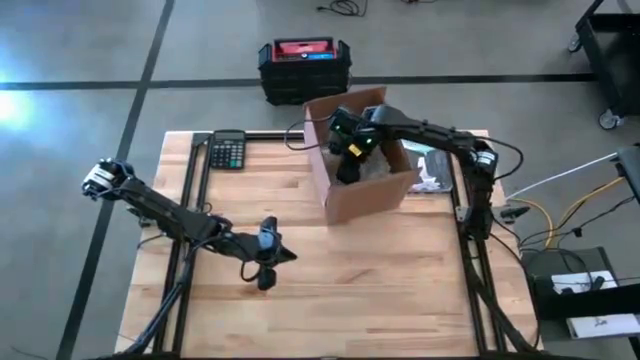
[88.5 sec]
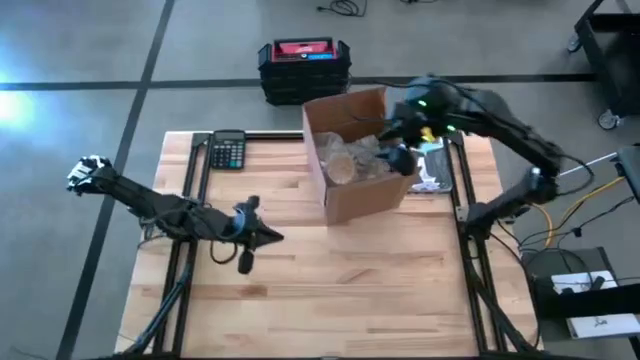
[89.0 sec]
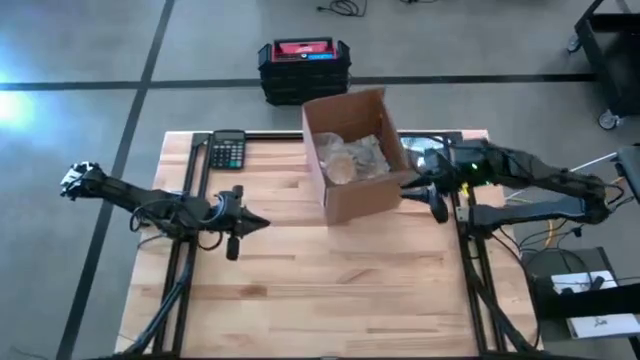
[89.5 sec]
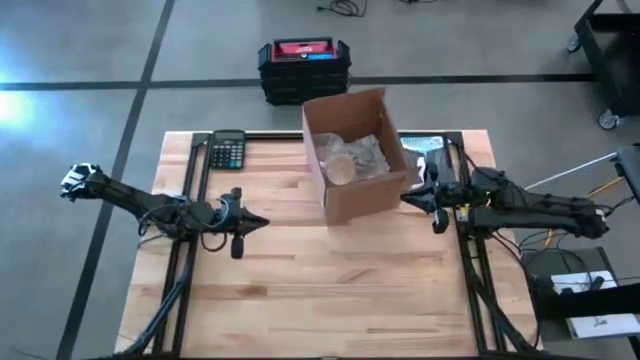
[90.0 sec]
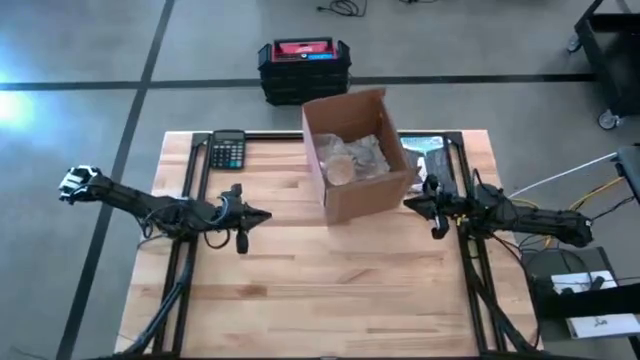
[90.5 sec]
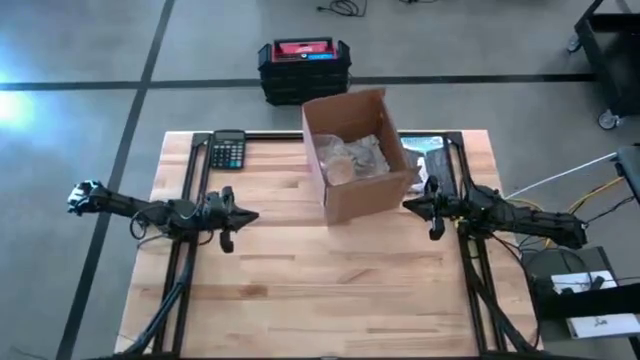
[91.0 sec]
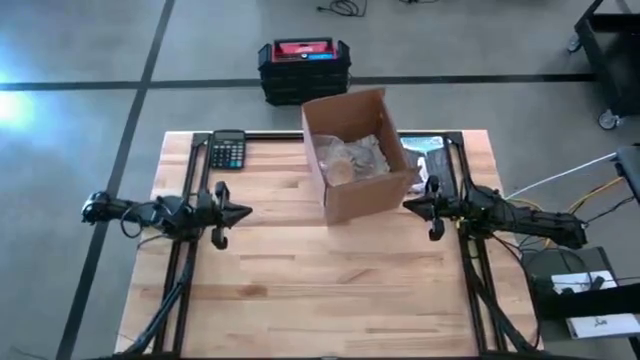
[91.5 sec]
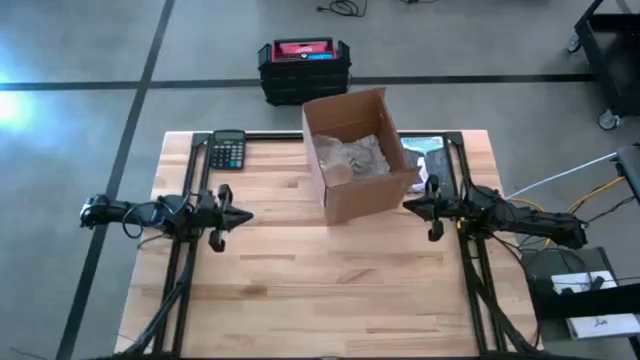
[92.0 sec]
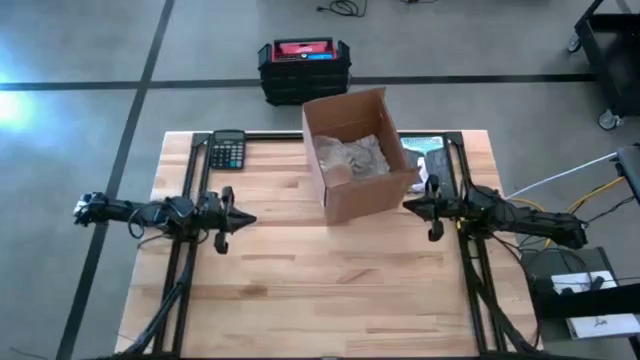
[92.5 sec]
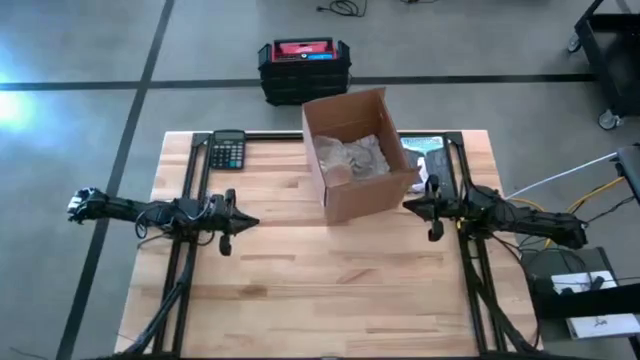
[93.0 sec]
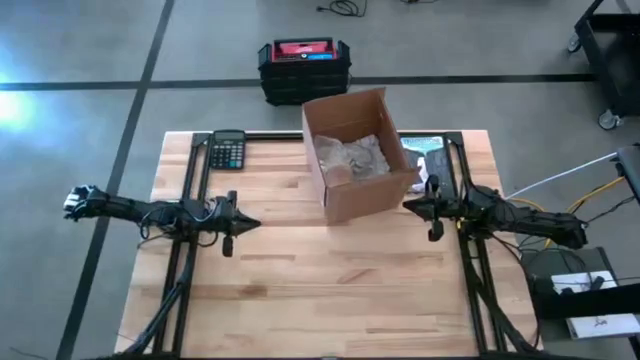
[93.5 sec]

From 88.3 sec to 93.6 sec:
Task: wrap mug
Return to Home Position

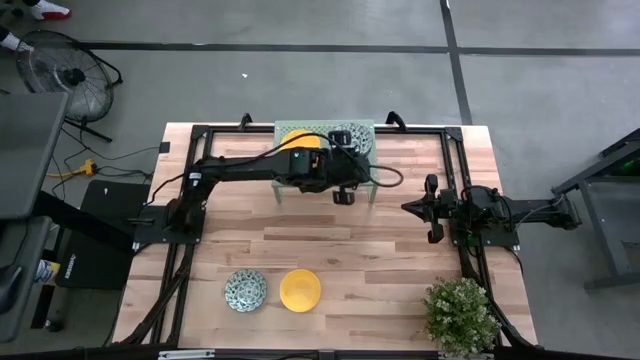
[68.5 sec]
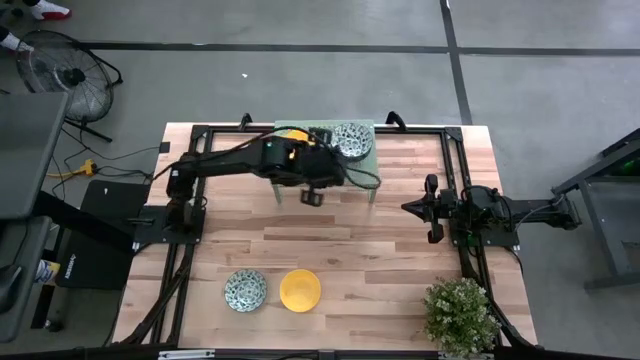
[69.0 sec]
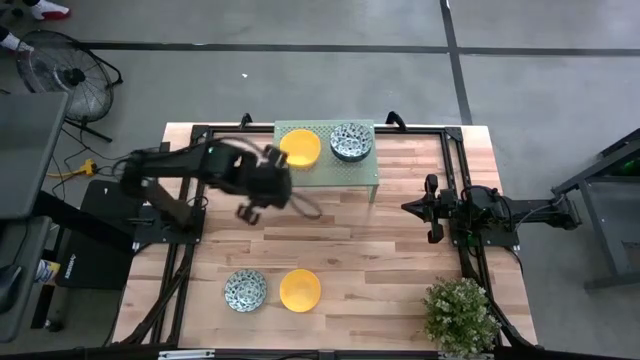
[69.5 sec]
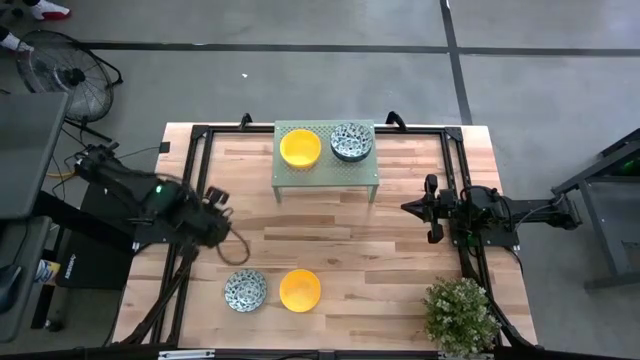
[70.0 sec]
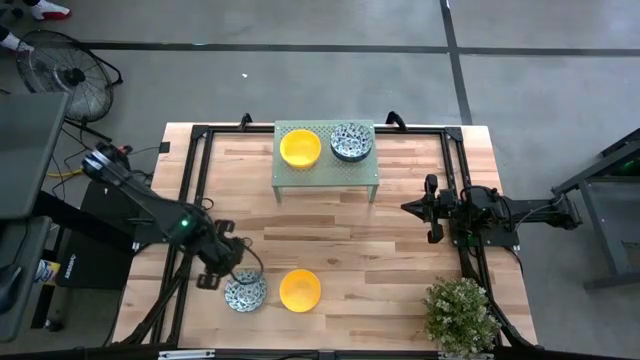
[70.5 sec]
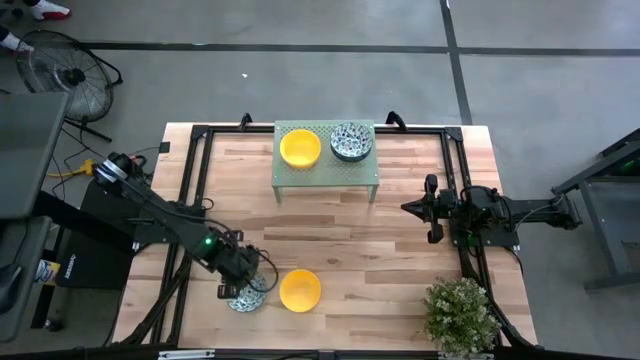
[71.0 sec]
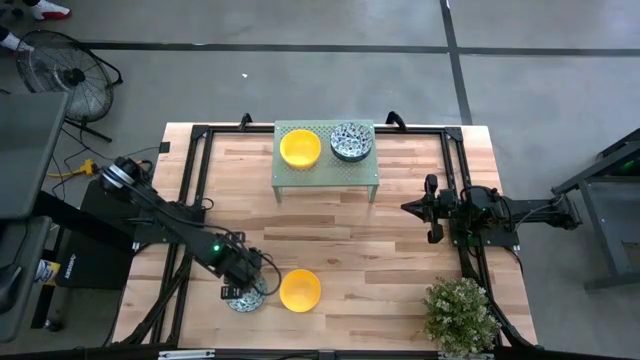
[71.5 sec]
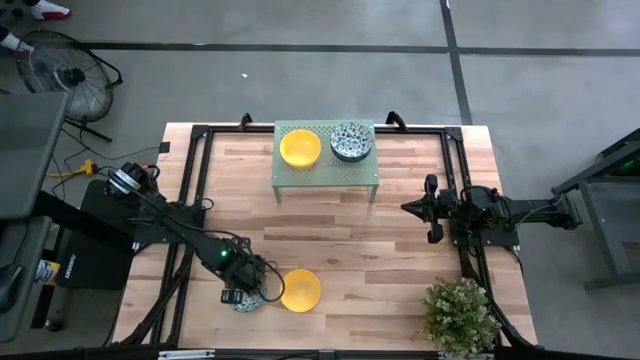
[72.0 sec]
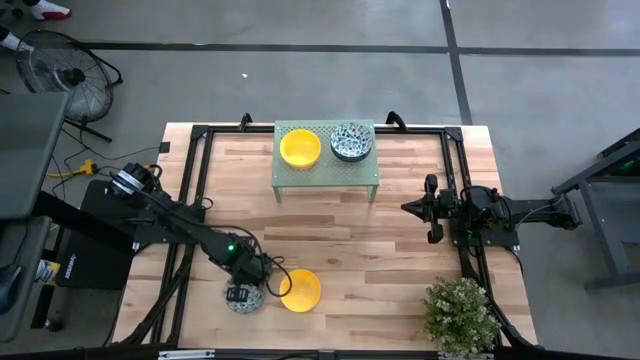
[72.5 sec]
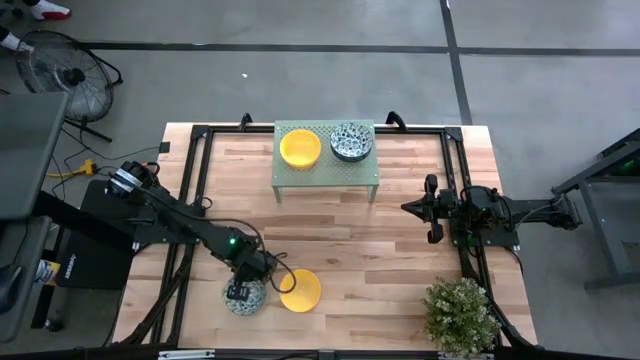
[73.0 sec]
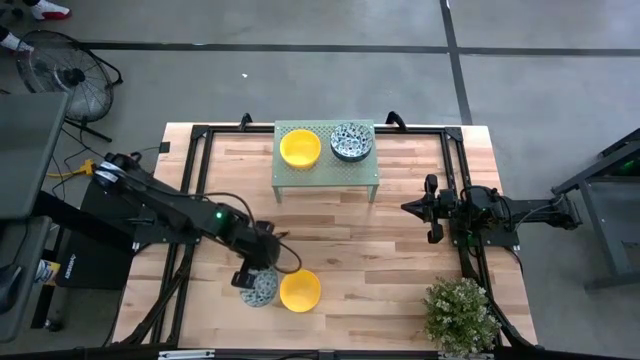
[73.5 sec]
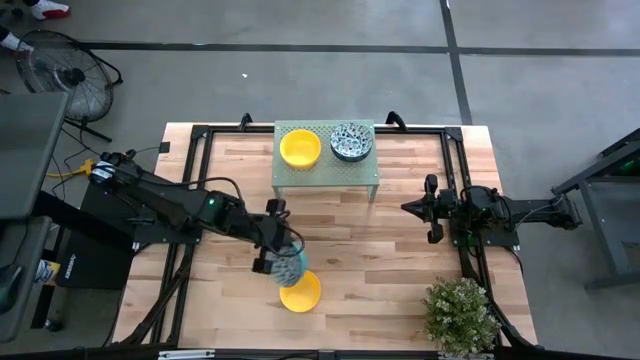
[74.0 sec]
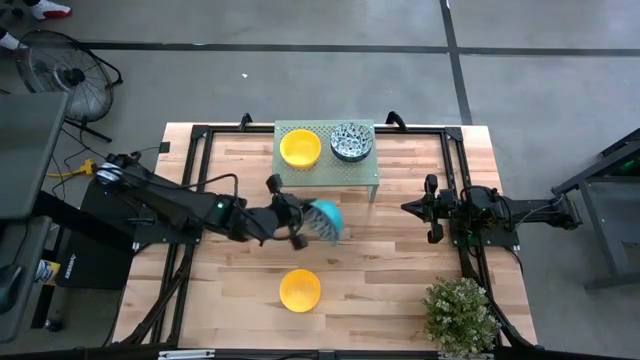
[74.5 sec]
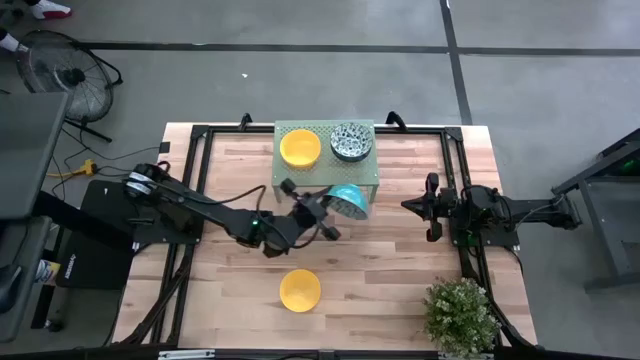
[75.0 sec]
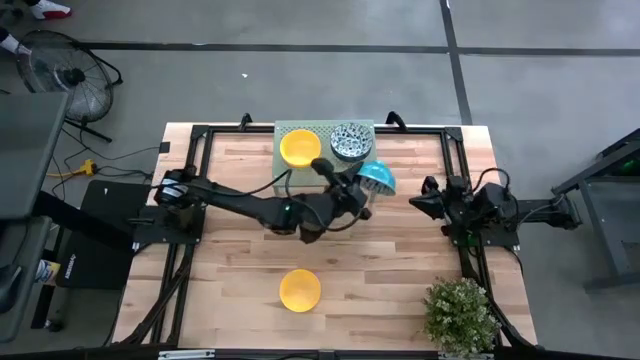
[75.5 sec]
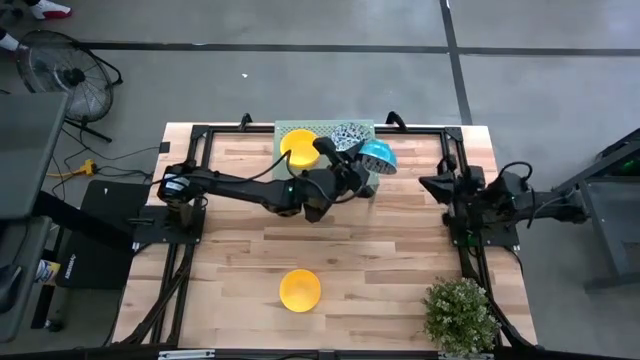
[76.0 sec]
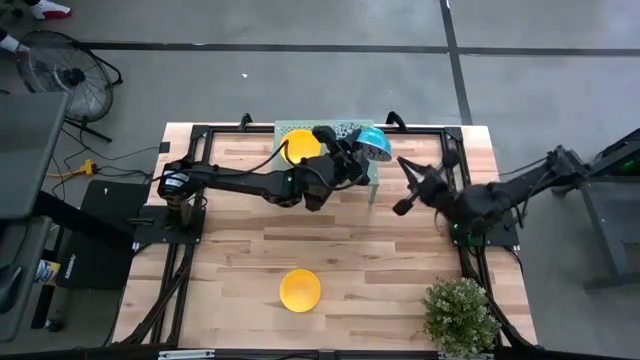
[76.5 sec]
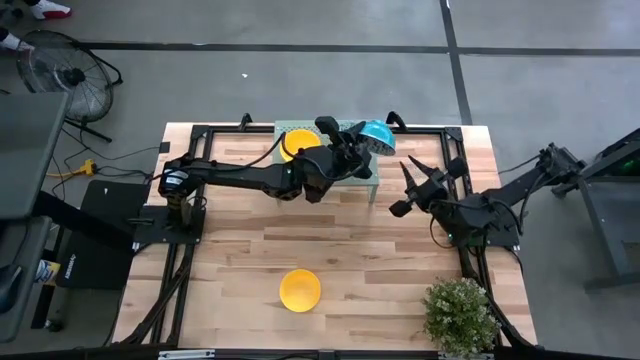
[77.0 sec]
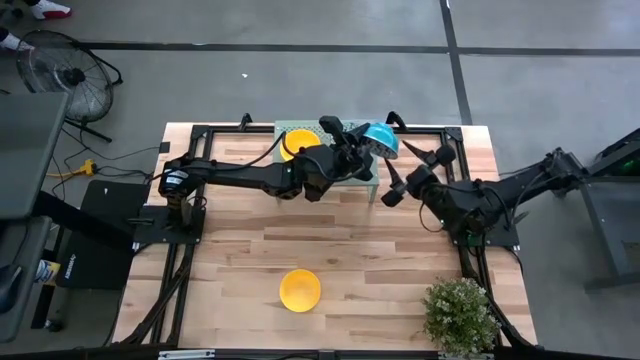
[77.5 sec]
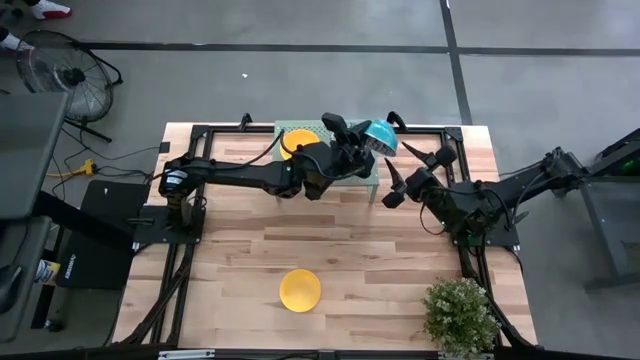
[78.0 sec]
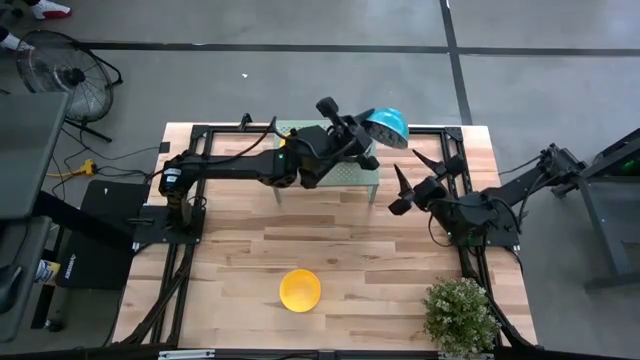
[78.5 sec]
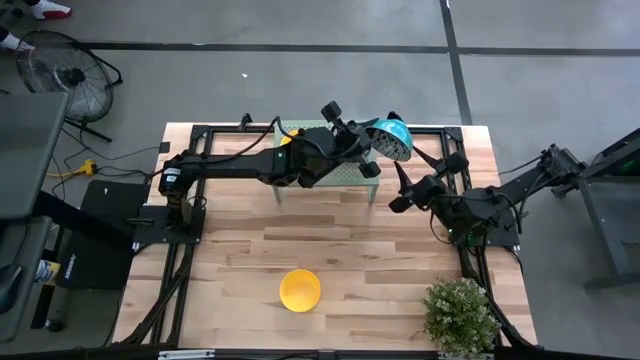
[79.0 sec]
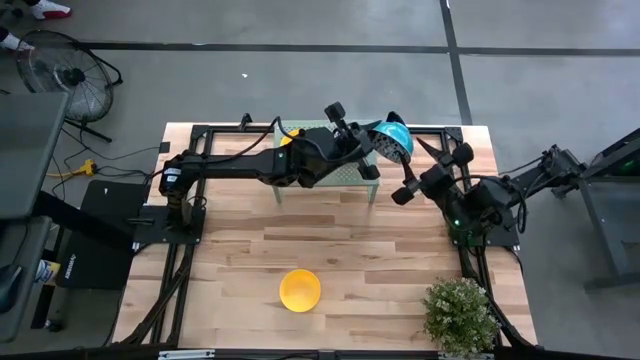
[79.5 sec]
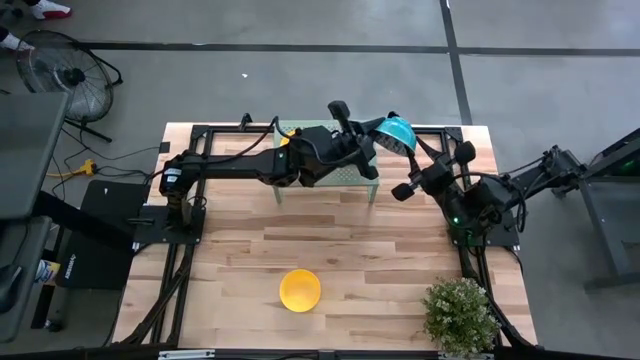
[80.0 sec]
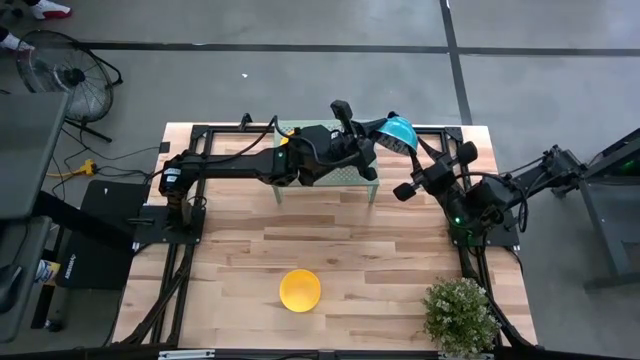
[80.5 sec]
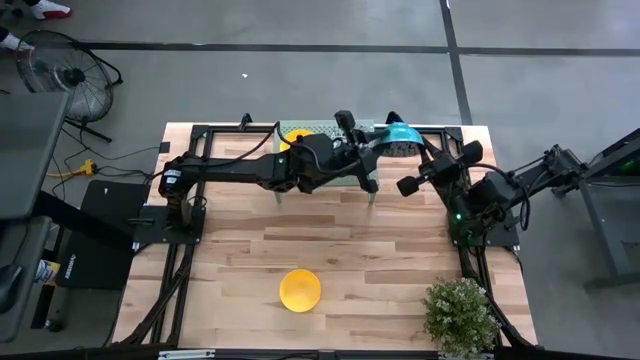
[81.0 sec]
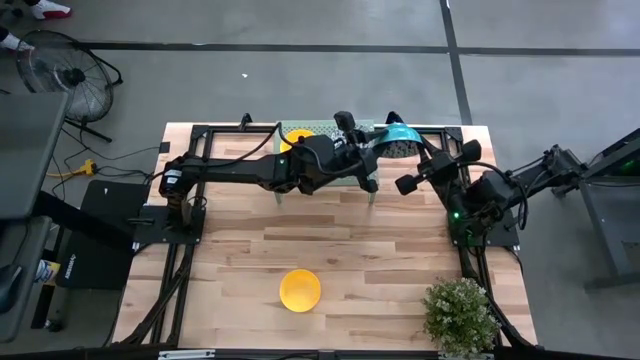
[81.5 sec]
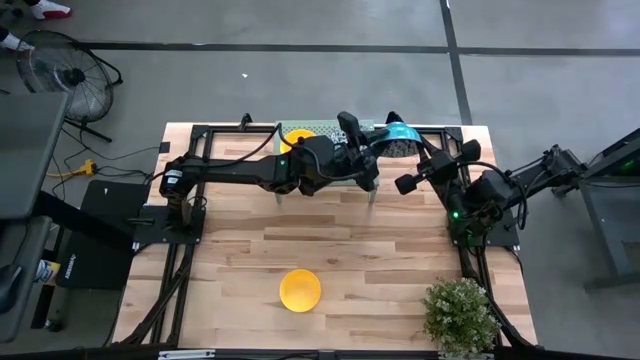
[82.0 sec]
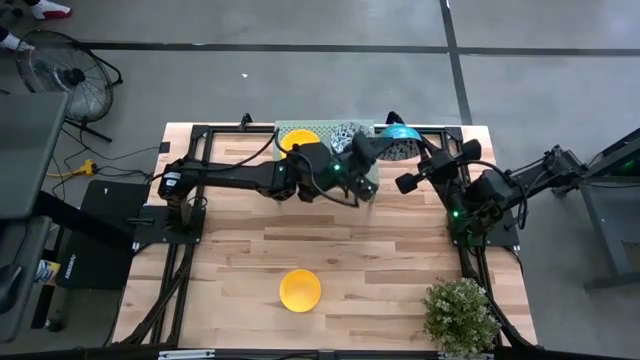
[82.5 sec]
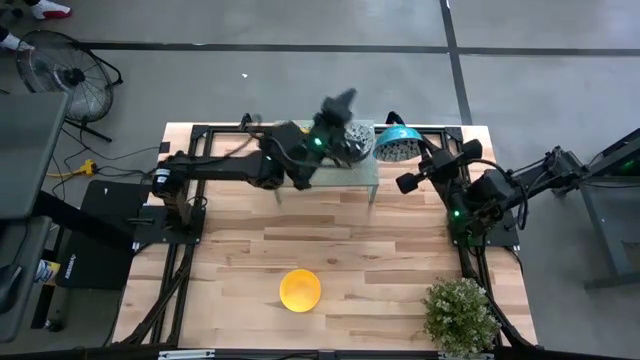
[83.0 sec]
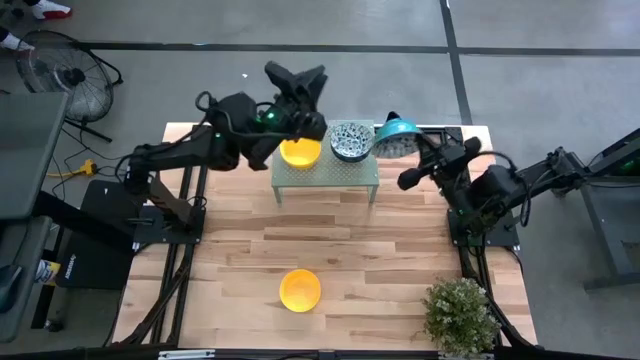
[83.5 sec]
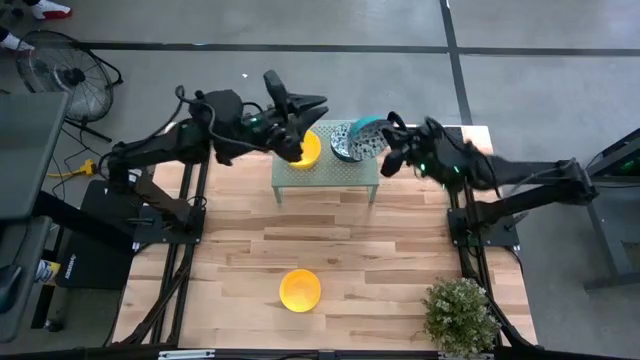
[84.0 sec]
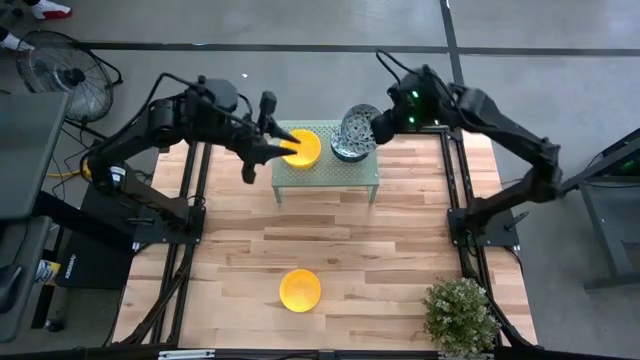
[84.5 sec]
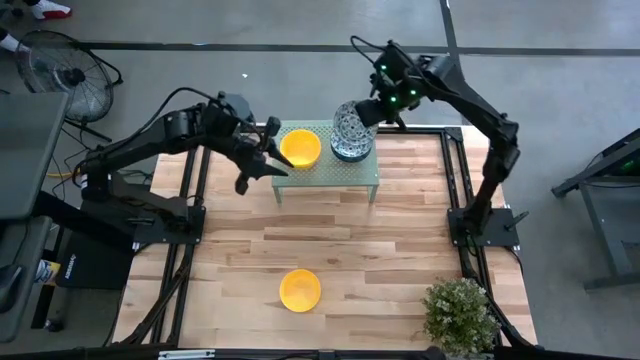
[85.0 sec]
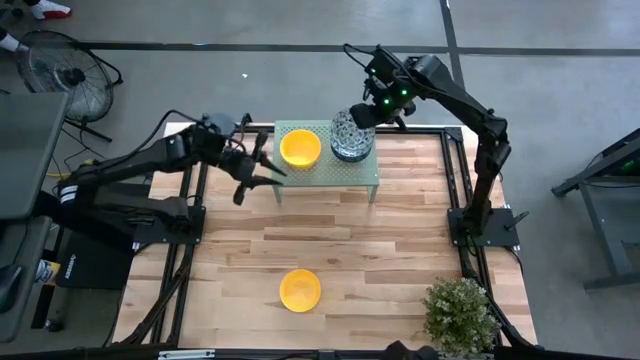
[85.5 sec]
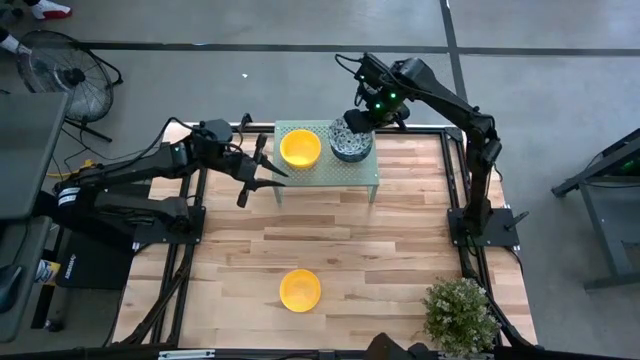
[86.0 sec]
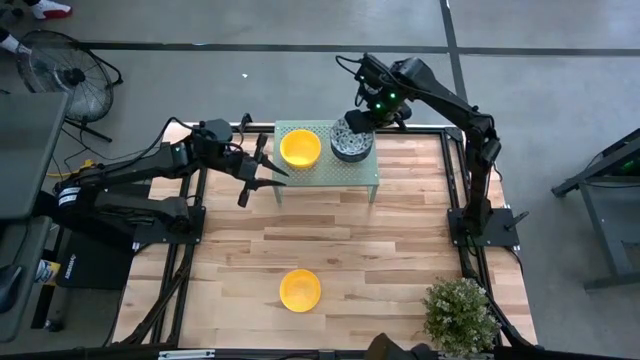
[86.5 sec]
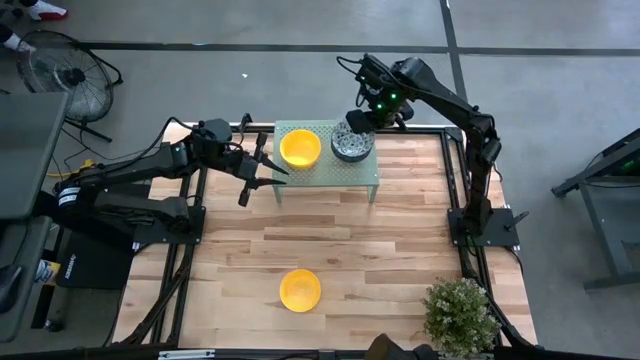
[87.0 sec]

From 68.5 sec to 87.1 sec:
Task: Pick & Place Mini bowls
Stack the blue patterned bowl on the stacked blue patterned bowls on the shelf
